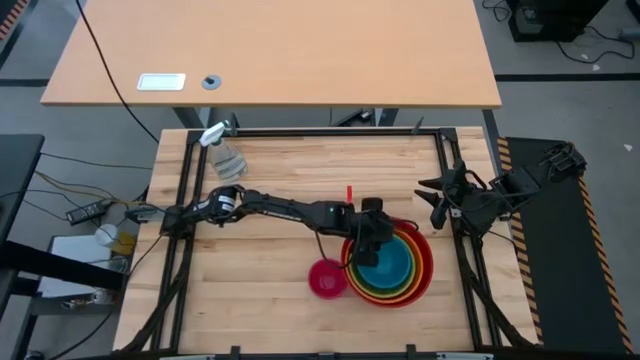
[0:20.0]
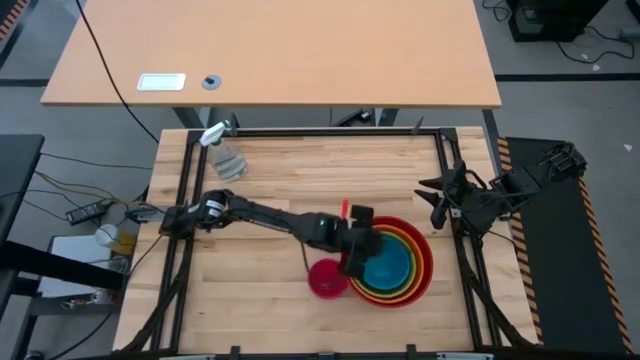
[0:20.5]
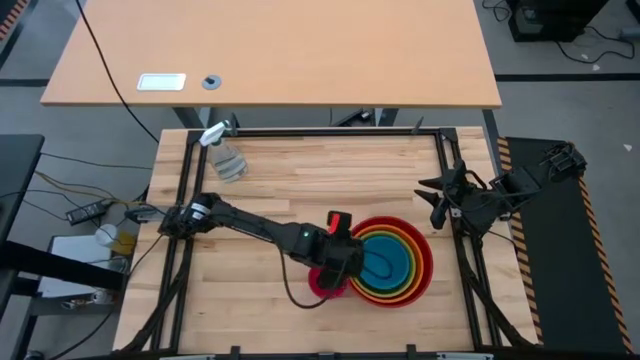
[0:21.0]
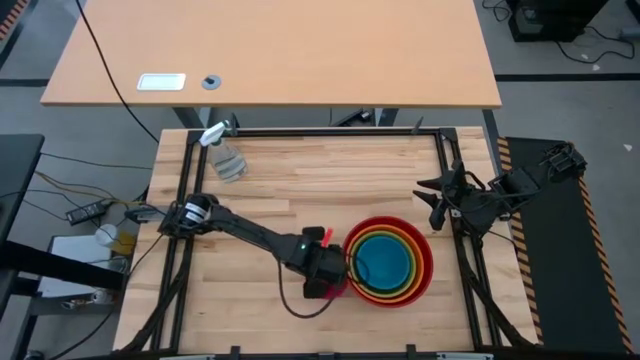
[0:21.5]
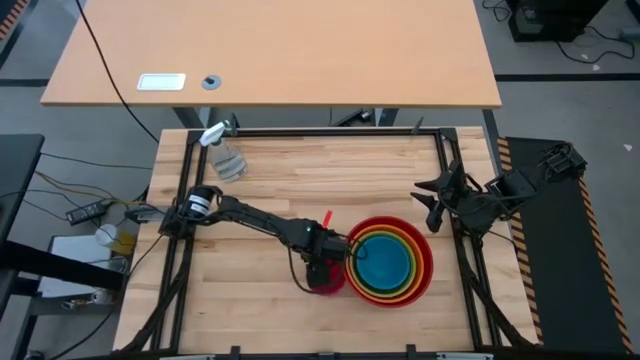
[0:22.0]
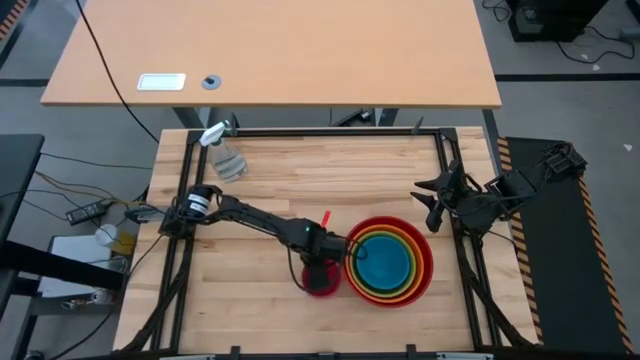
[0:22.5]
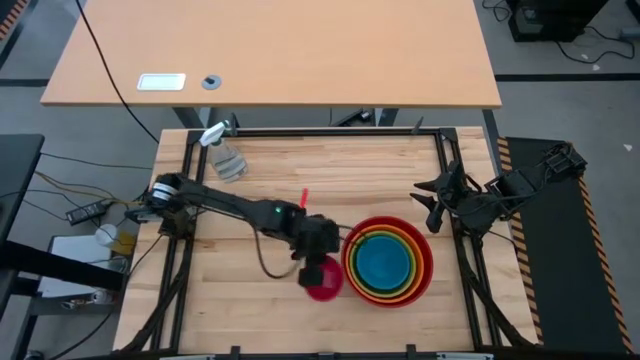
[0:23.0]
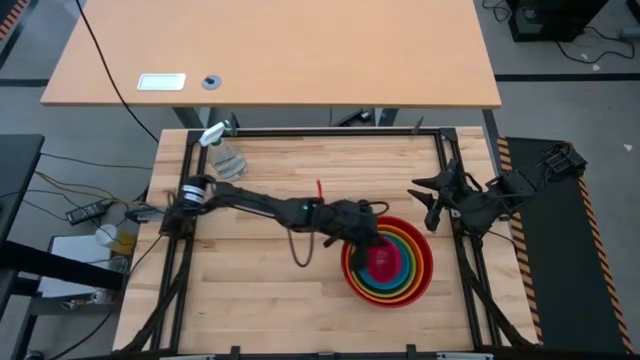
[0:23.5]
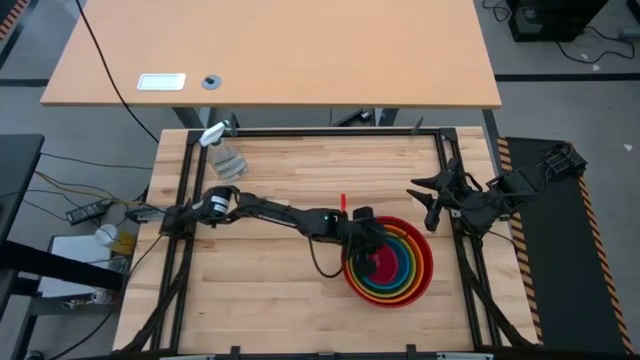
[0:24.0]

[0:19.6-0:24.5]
Stack the pink bowl on the blue bowl

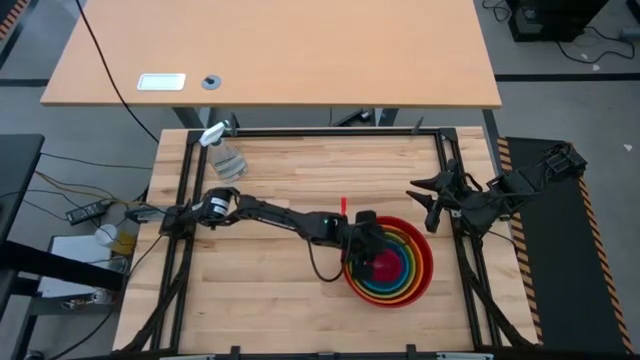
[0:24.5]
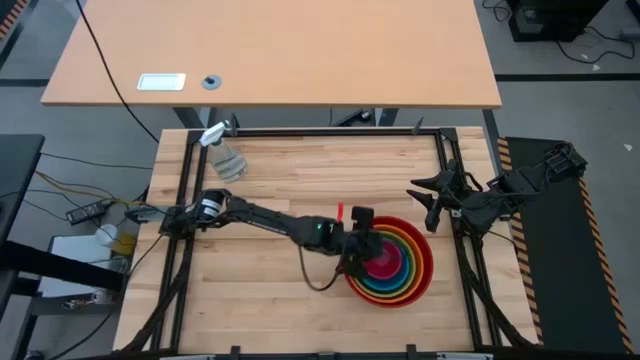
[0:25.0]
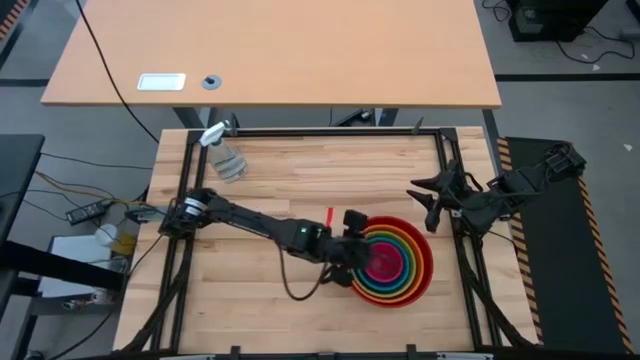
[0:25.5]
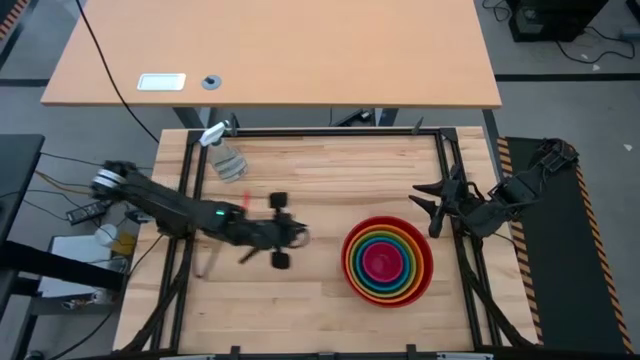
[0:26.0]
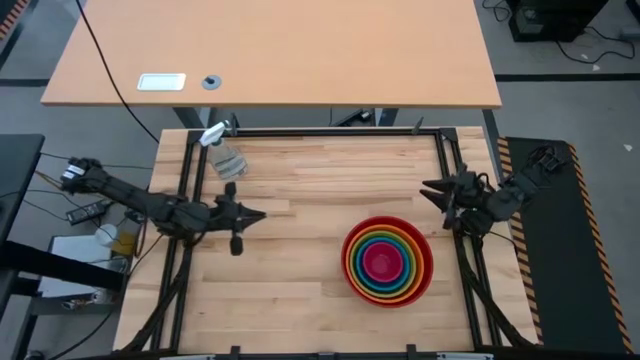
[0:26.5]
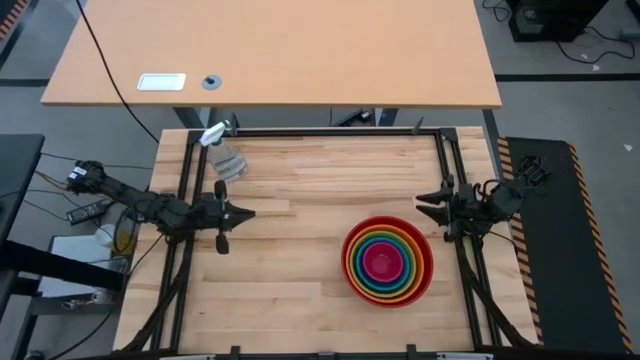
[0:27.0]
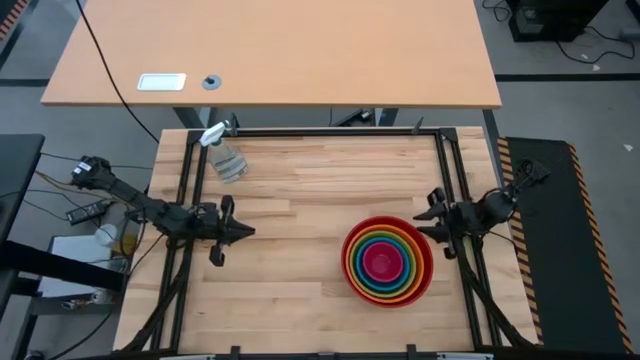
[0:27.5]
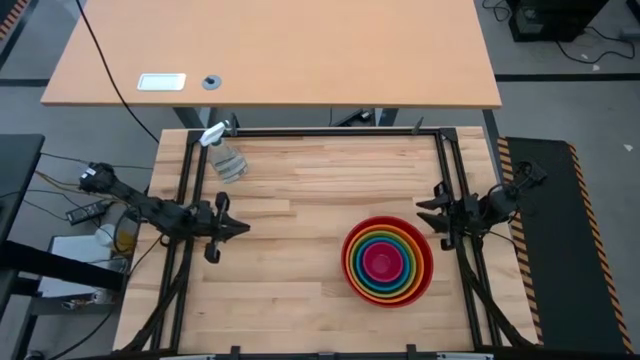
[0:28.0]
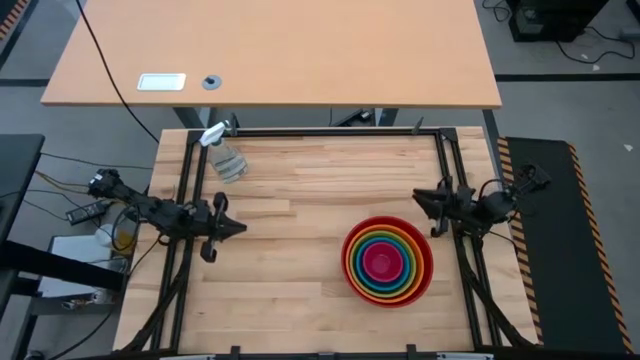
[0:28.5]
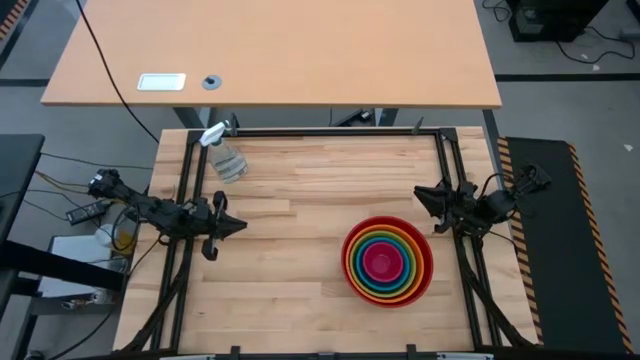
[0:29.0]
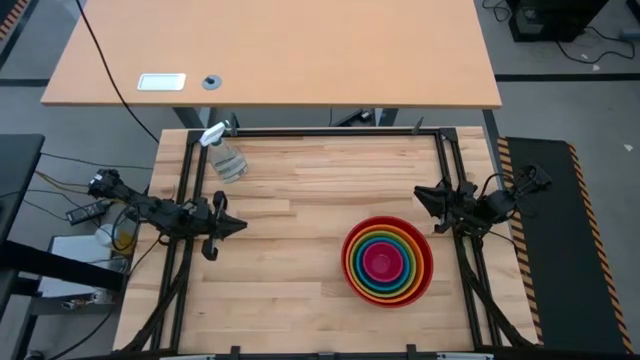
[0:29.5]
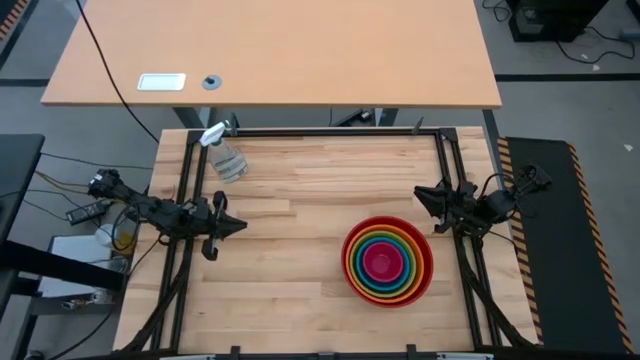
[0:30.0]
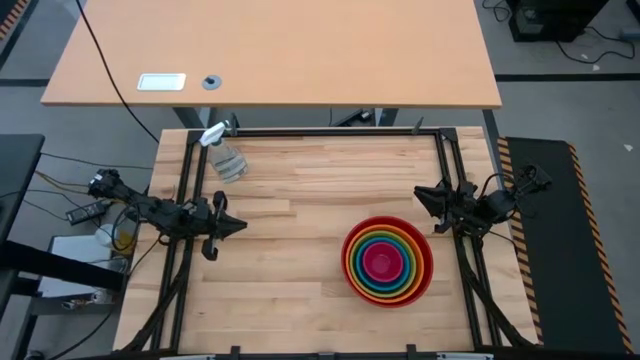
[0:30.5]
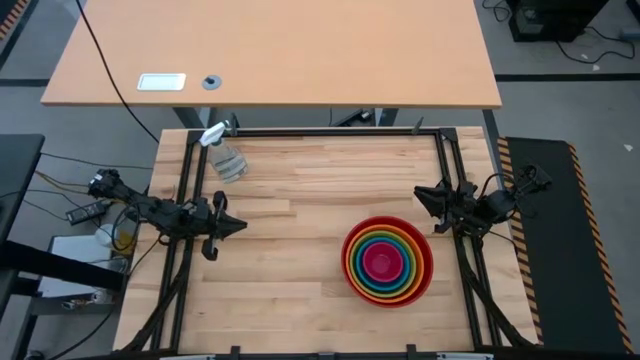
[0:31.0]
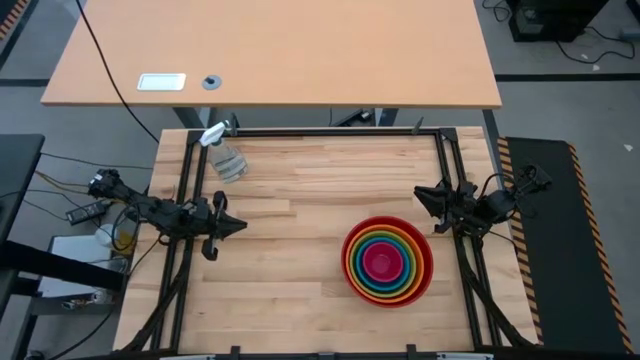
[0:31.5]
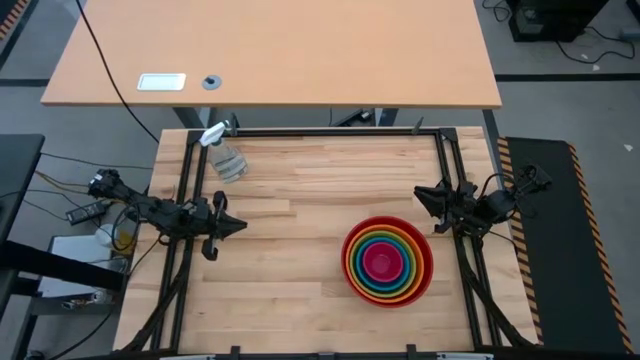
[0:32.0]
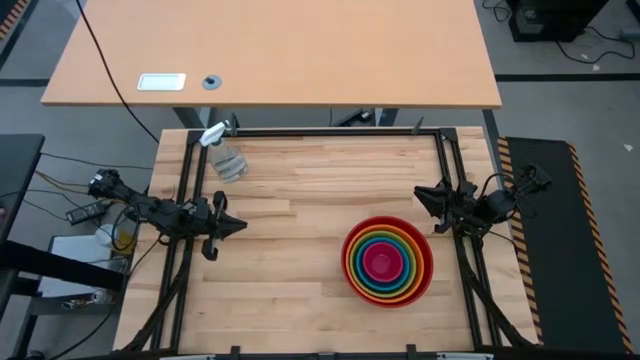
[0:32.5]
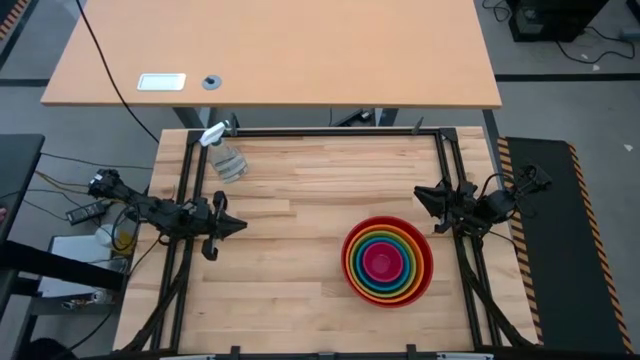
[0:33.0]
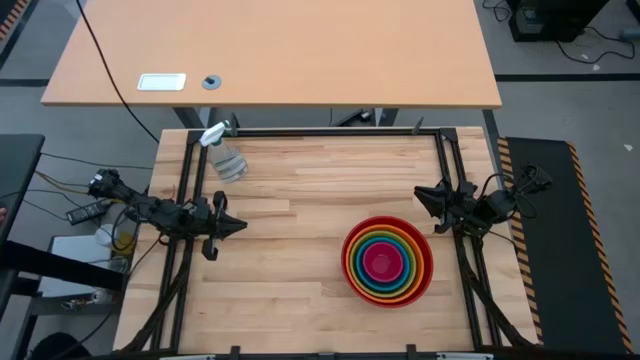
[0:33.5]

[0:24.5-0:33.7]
Return to Home Position
